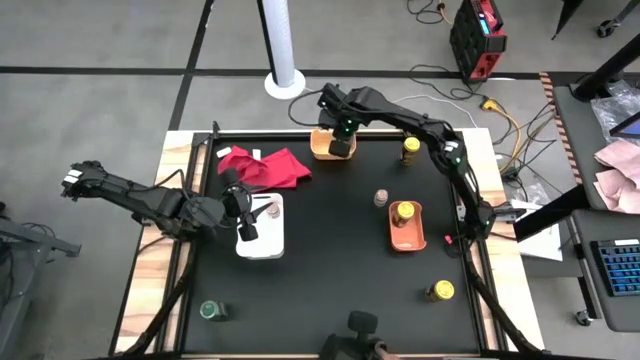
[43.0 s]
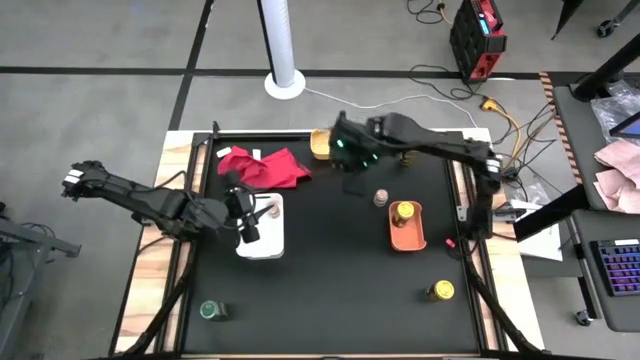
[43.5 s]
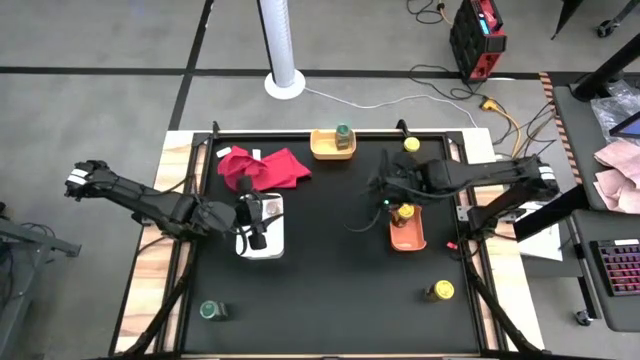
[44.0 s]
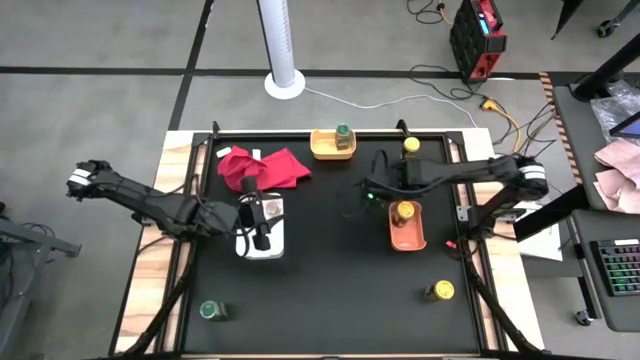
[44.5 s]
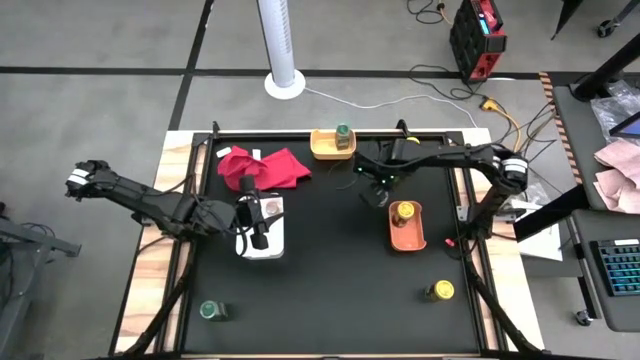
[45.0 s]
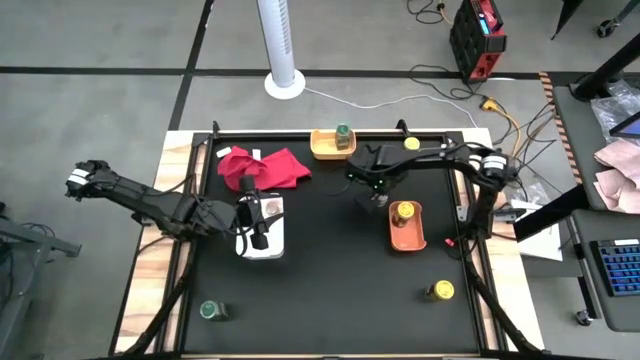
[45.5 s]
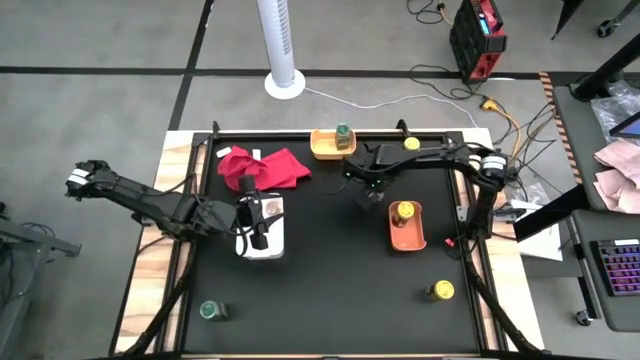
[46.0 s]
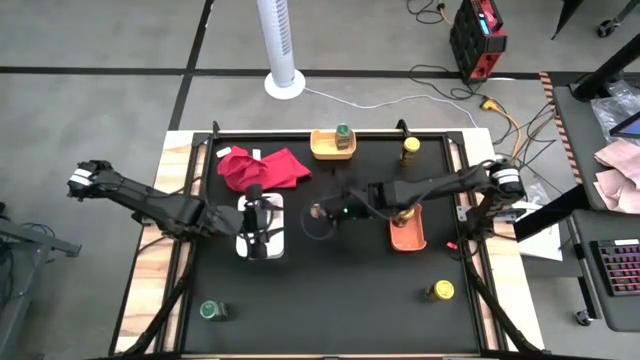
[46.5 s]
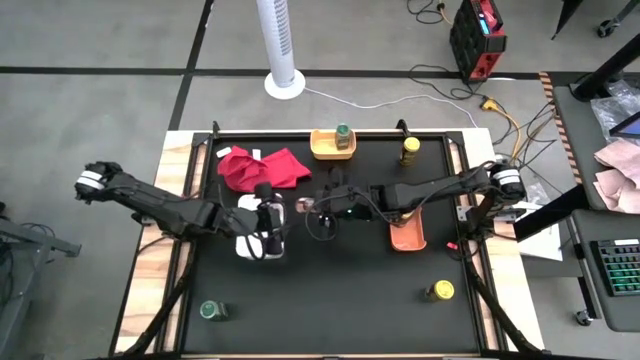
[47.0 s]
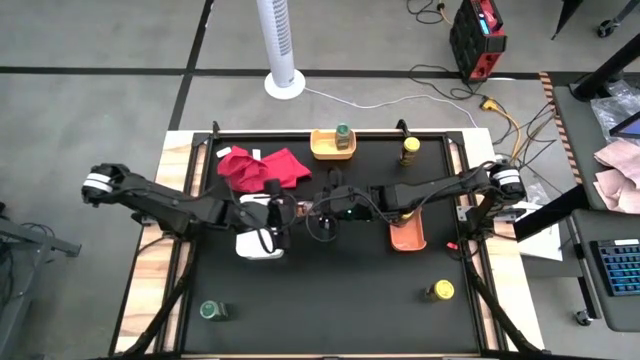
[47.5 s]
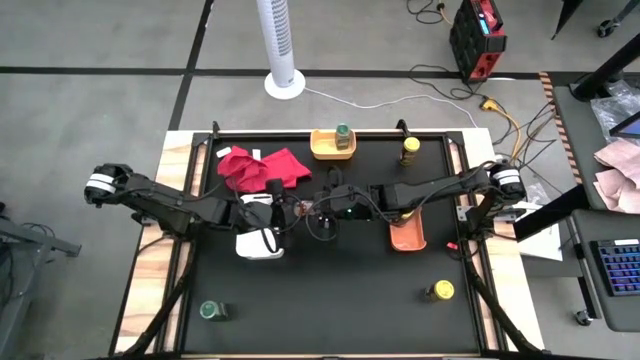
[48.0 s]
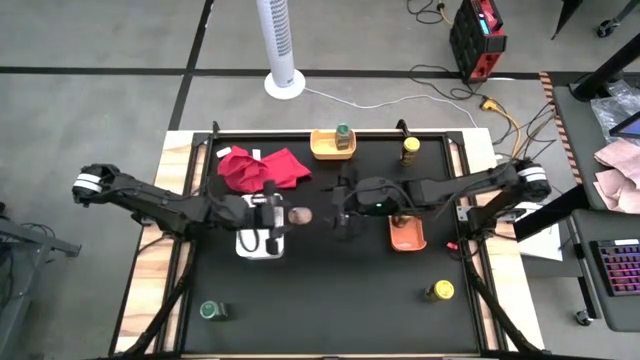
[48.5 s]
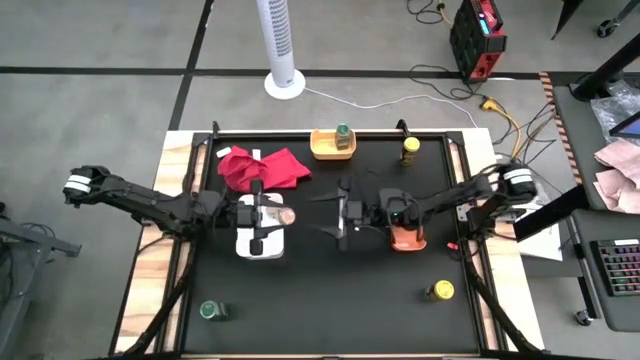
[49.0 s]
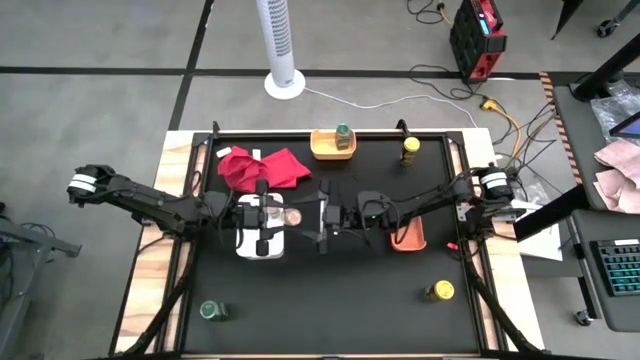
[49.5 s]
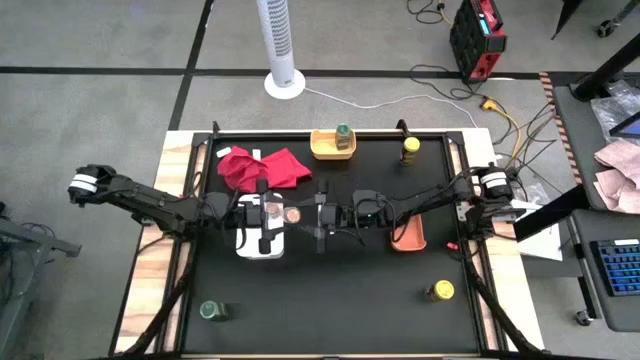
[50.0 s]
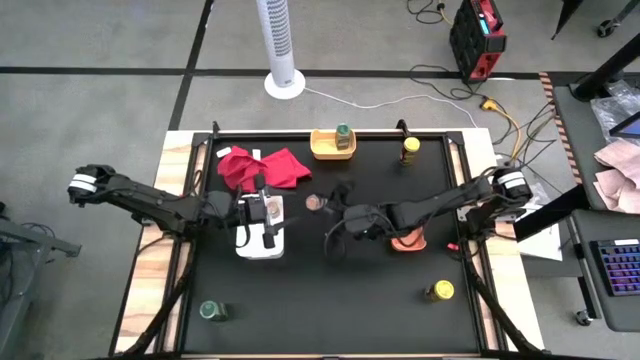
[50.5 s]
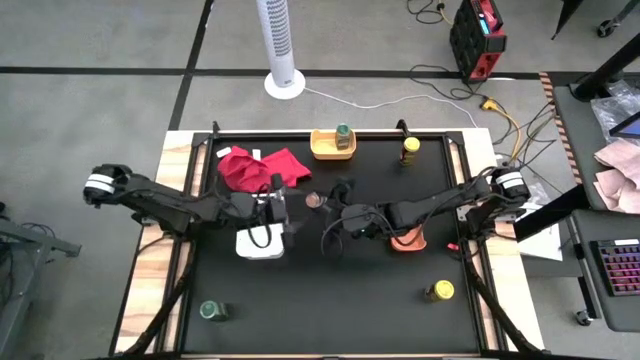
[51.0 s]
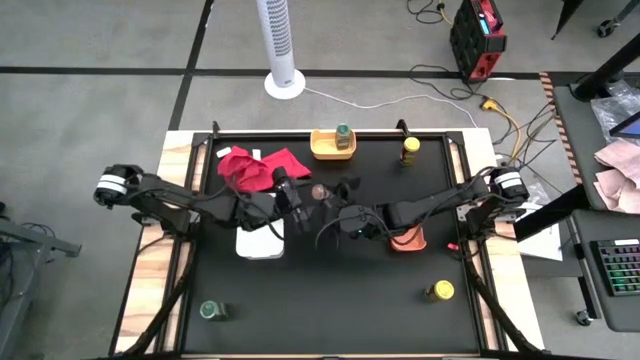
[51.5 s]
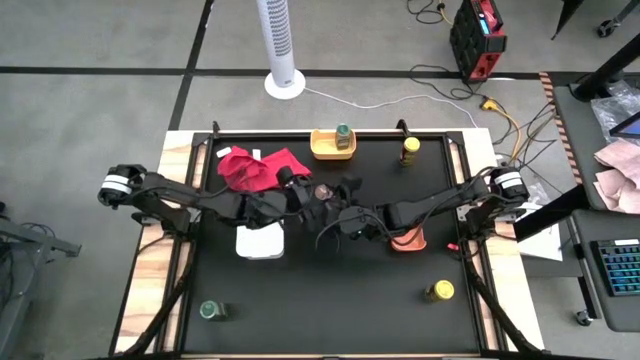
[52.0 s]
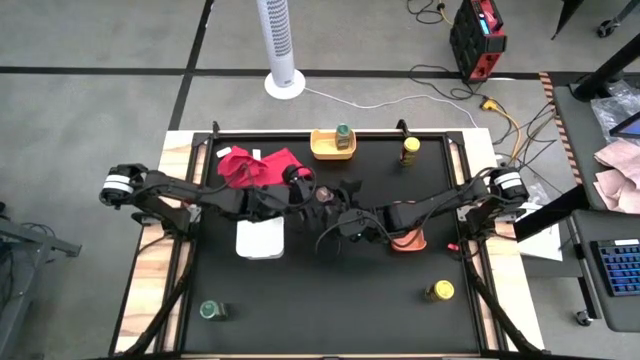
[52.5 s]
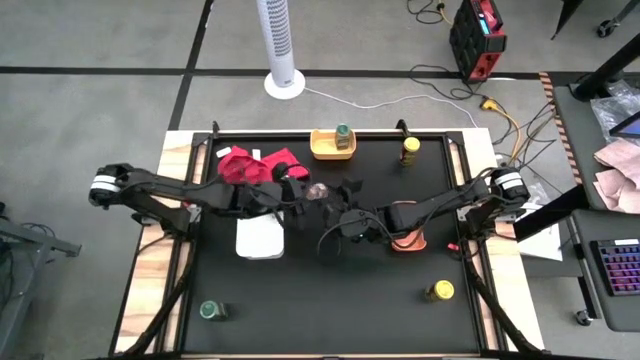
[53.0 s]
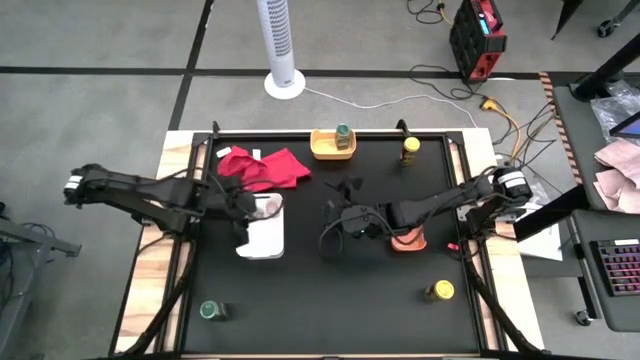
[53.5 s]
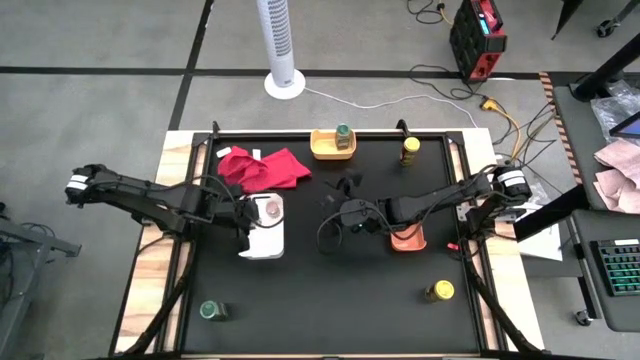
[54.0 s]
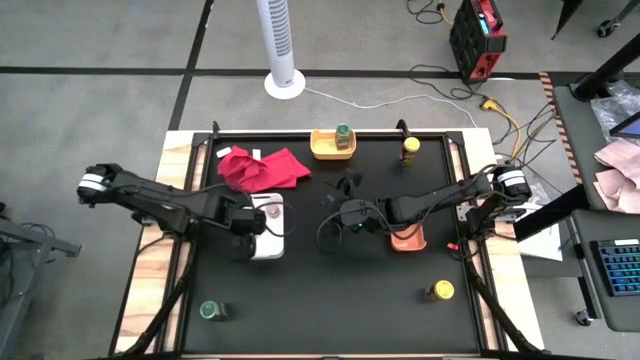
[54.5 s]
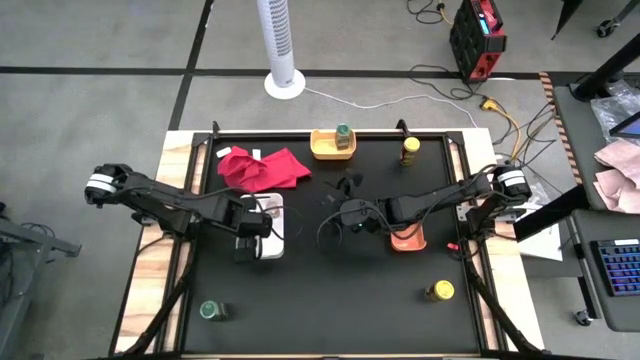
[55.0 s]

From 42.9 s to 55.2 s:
Task: Sort spices by type
Put the transparent seasoning bottle into the white bin

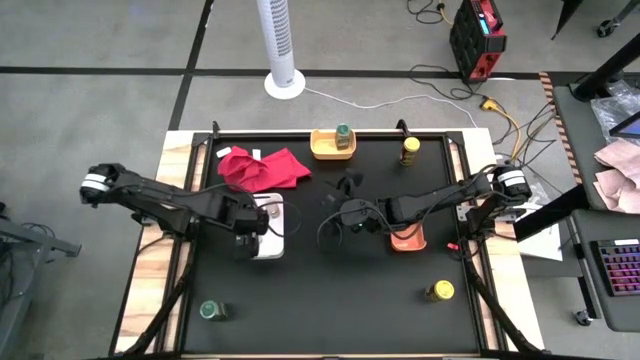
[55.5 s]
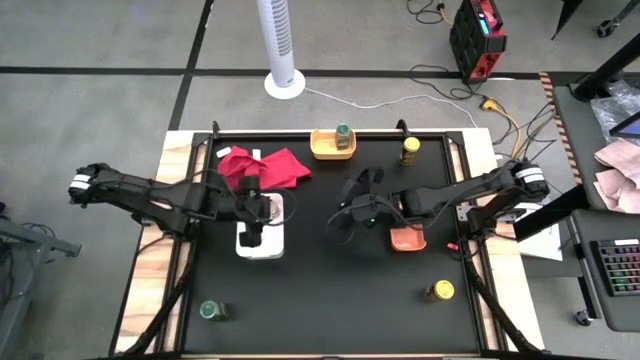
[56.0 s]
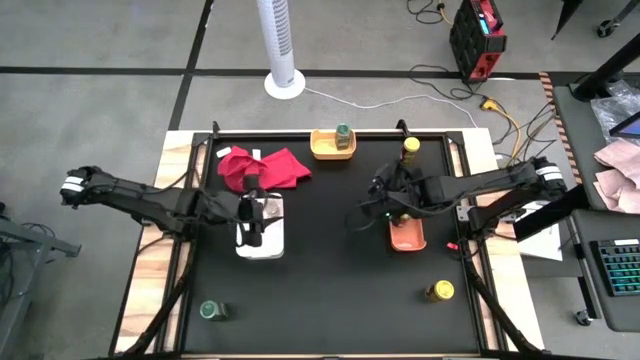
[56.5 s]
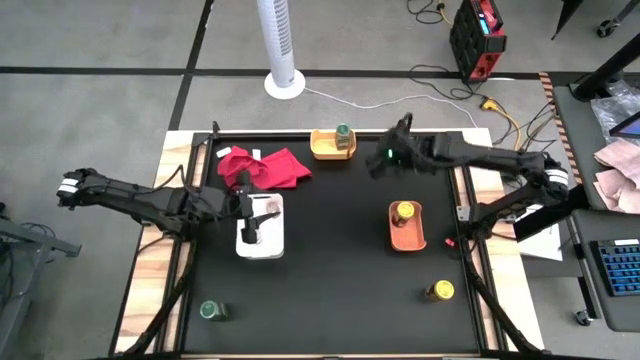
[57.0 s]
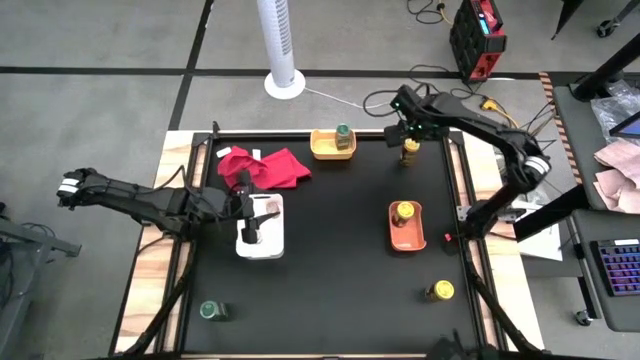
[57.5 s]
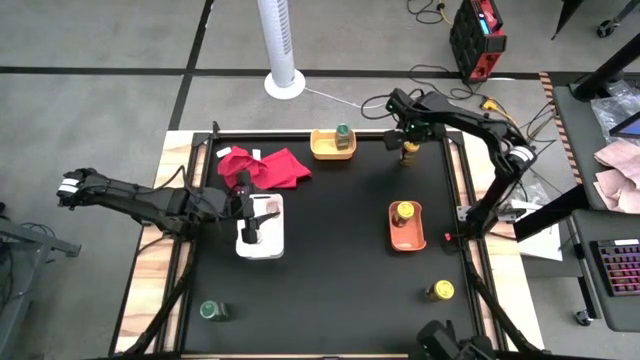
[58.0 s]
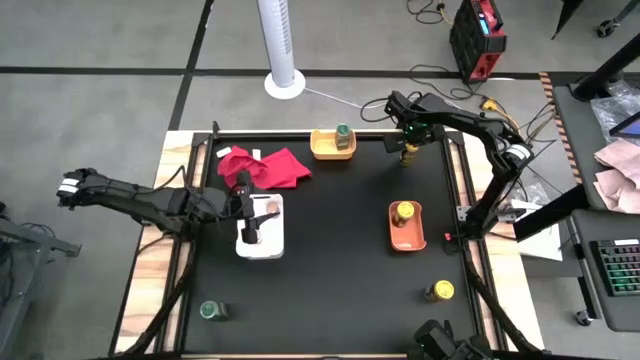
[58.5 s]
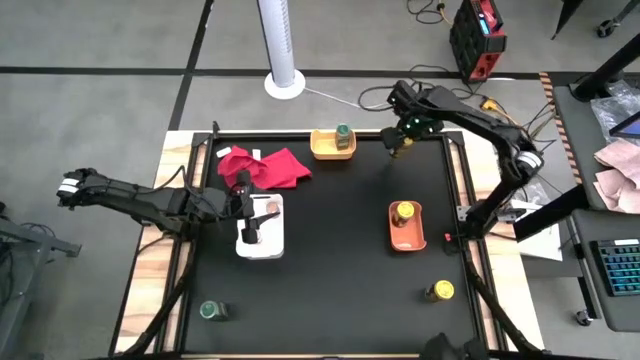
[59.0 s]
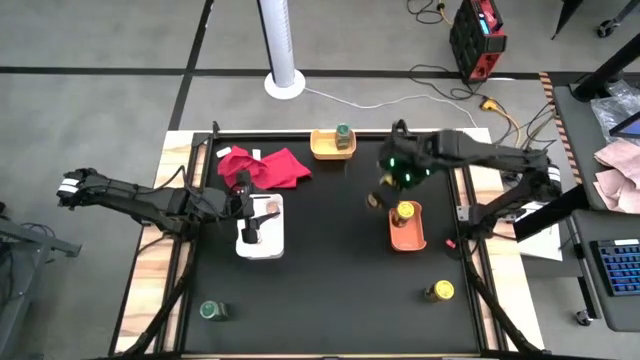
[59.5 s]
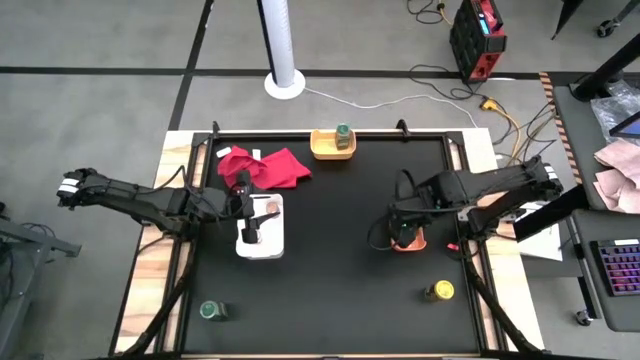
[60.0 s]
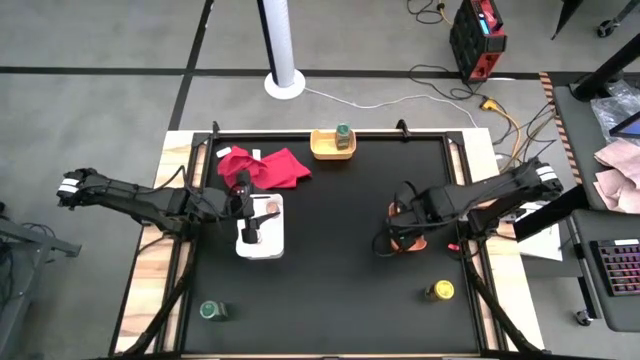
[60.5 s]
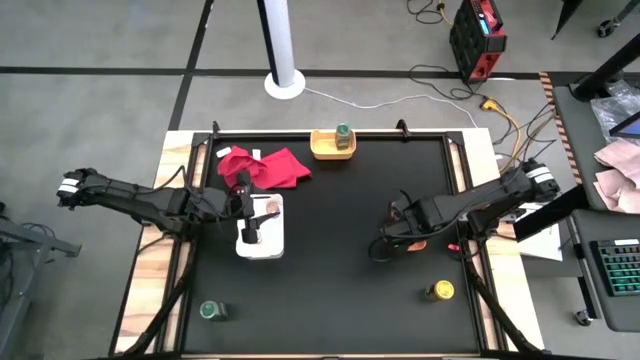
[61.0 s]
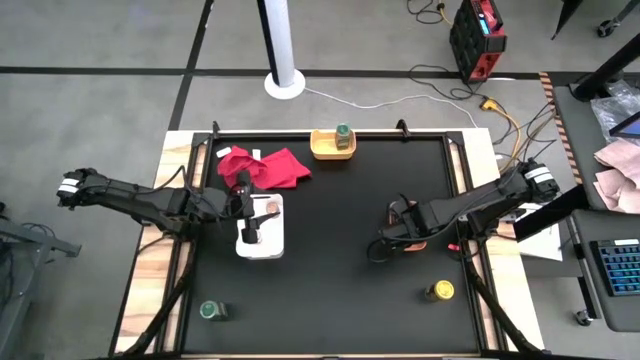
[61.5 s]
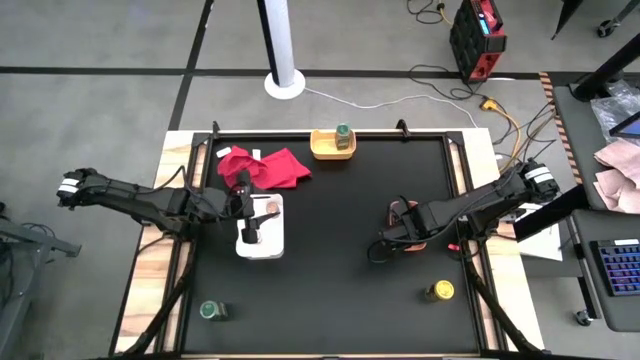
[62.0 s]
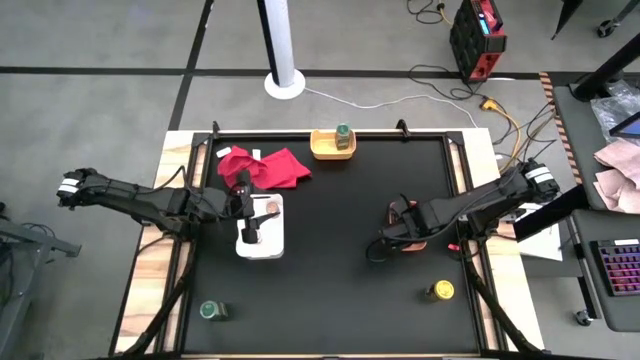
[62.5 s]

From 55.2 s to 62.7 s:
Put the top yellow seasoning bottle into the orange bin
